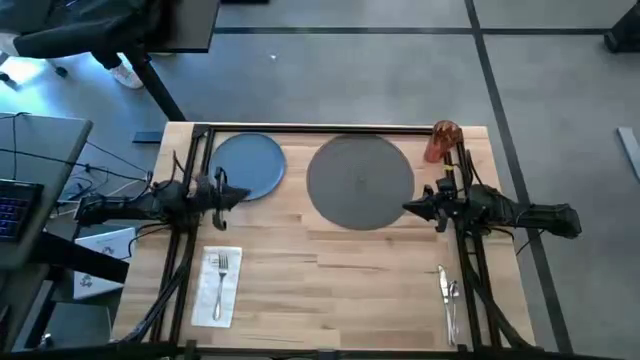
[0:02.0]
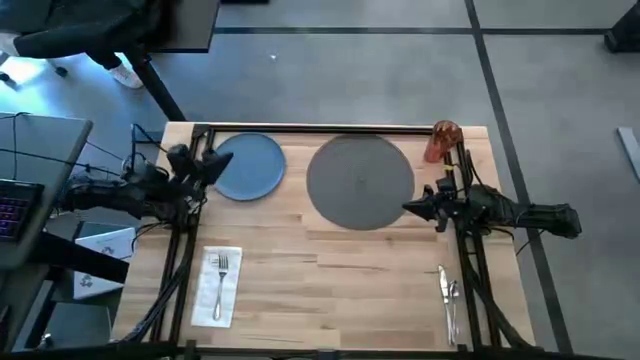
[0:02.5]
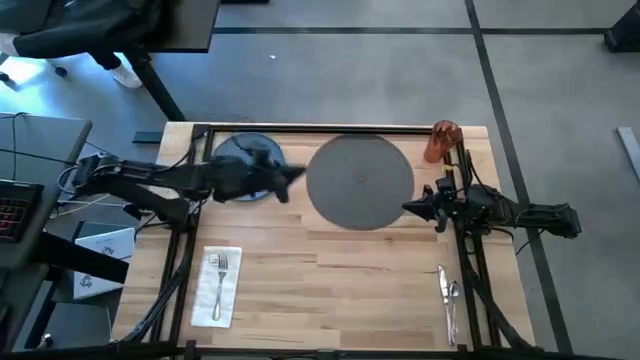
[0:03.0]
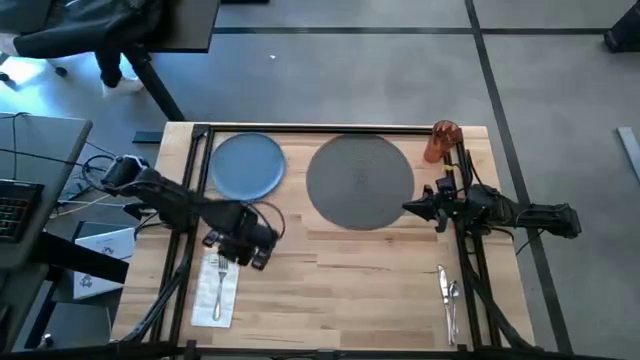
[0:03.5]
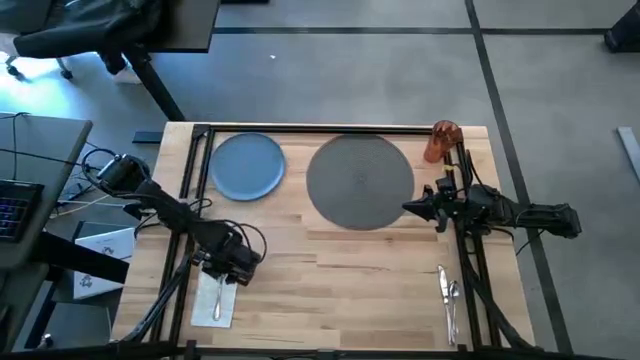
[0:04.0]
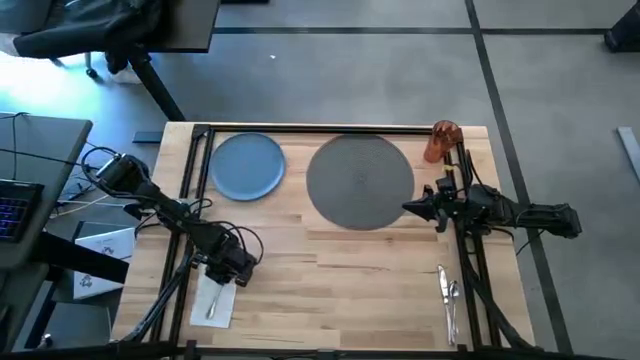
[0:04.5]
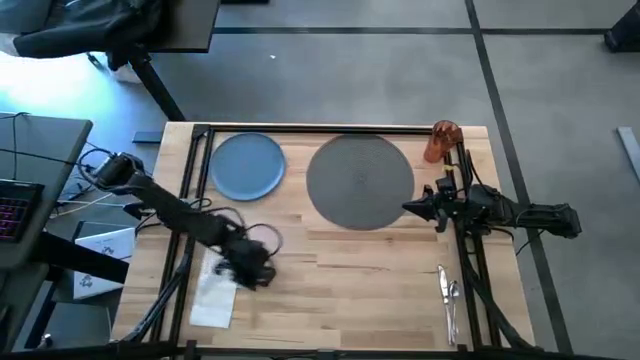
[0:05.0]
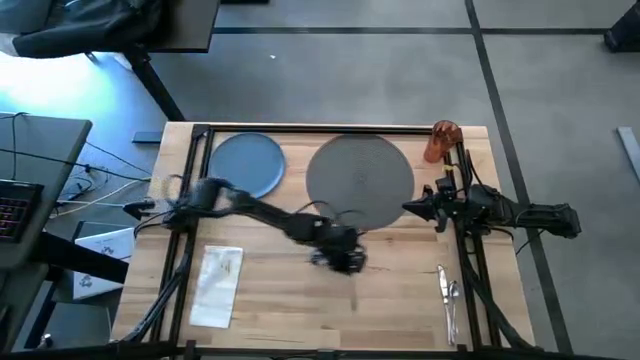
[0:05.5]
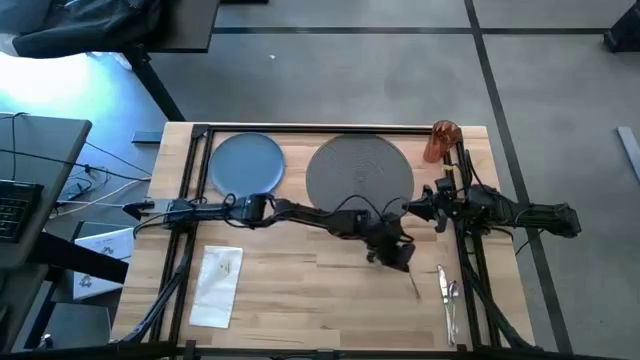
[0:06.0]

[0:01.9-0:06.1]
Task: Set table place
Move the silver fork to the left side of the table knife

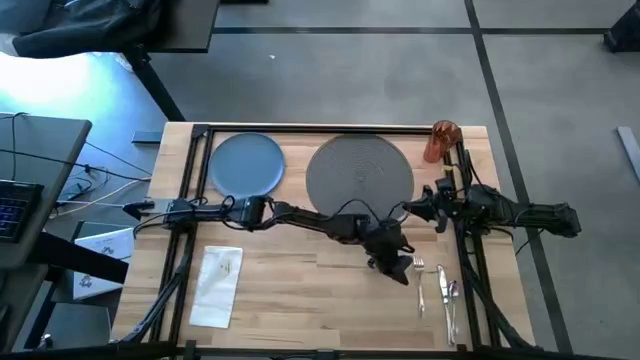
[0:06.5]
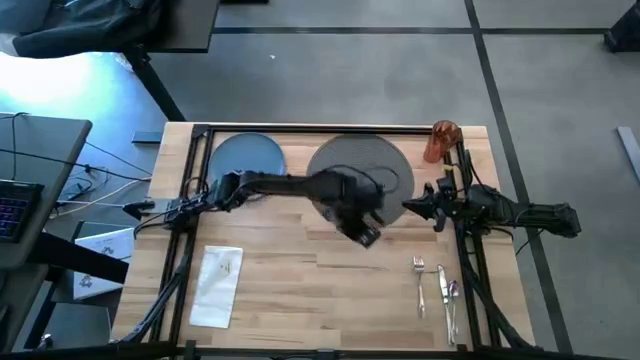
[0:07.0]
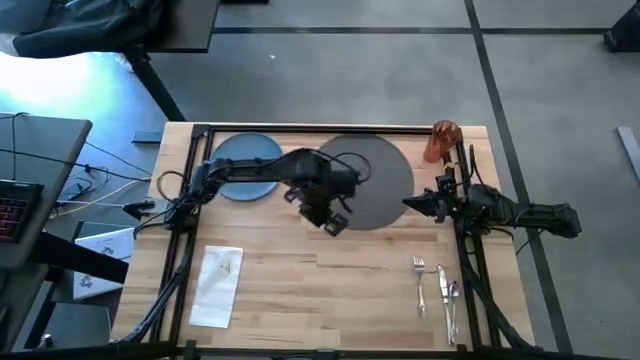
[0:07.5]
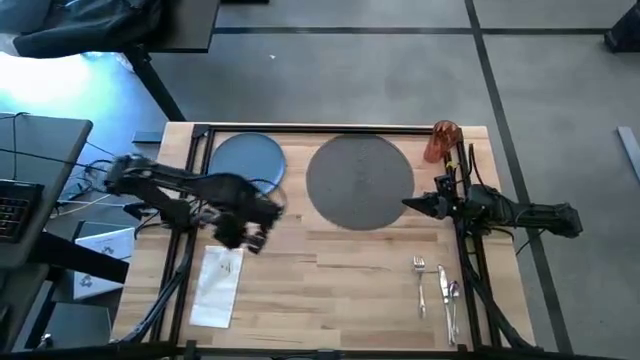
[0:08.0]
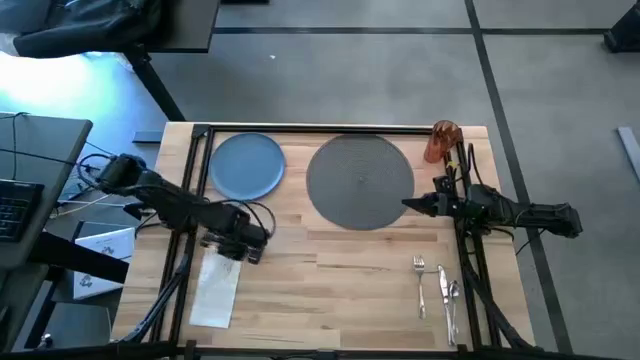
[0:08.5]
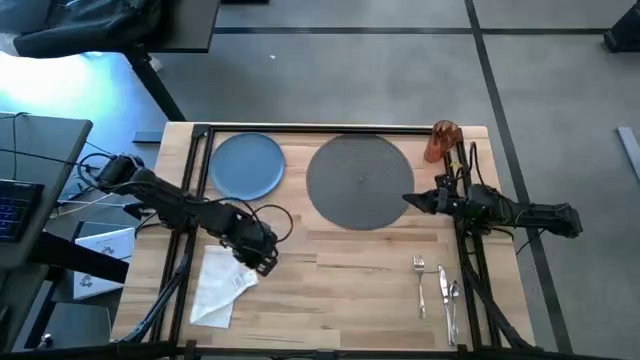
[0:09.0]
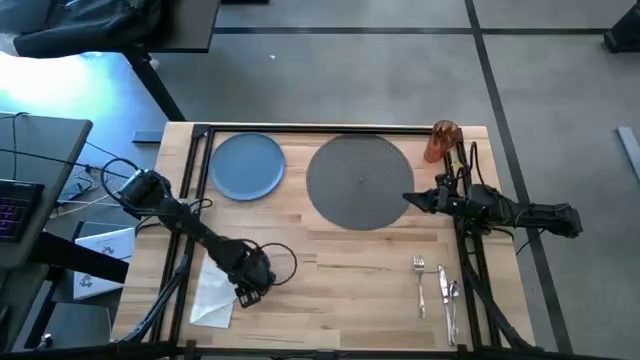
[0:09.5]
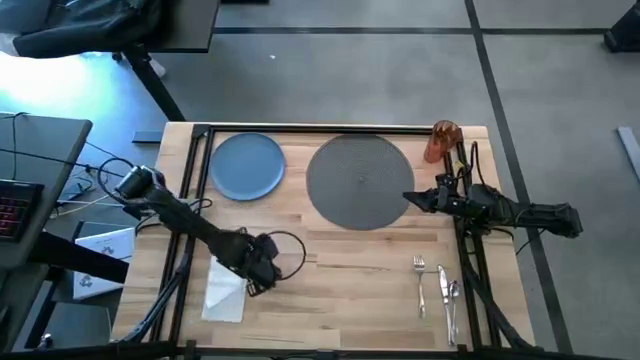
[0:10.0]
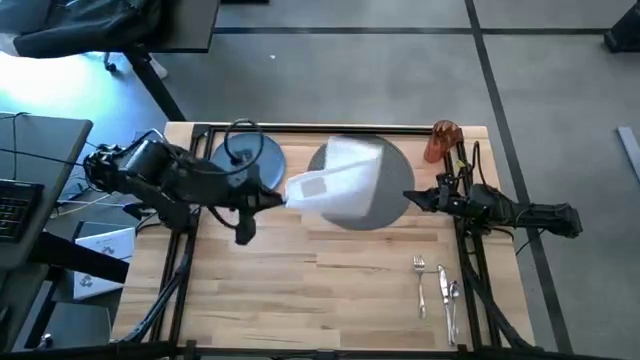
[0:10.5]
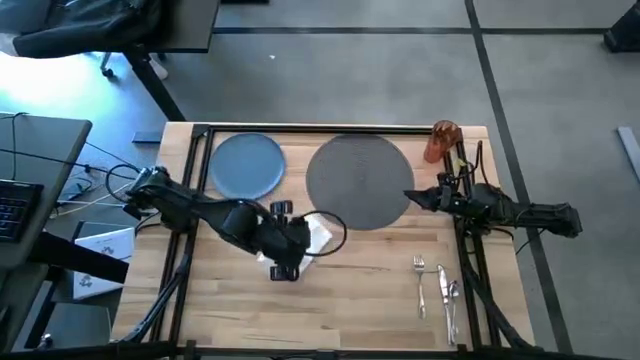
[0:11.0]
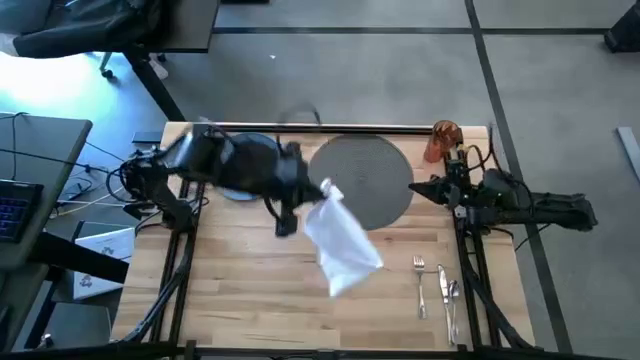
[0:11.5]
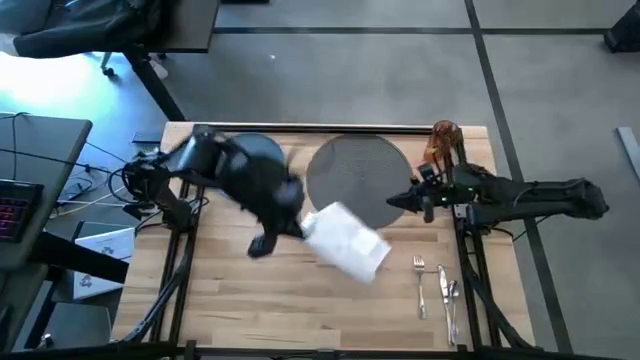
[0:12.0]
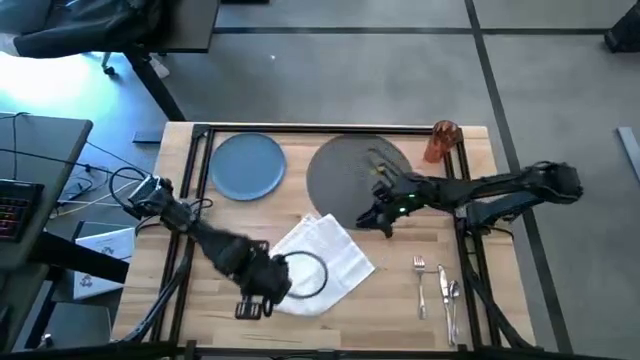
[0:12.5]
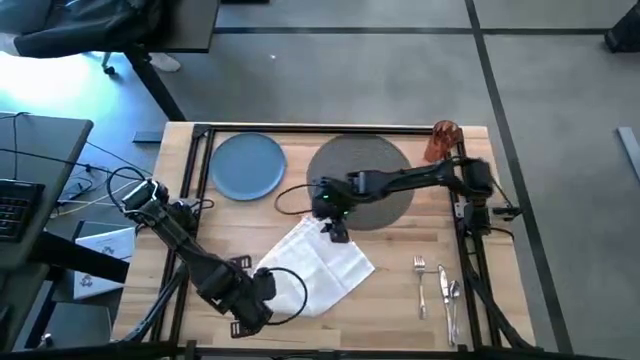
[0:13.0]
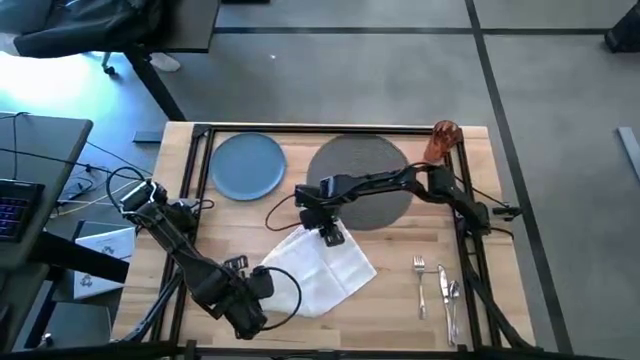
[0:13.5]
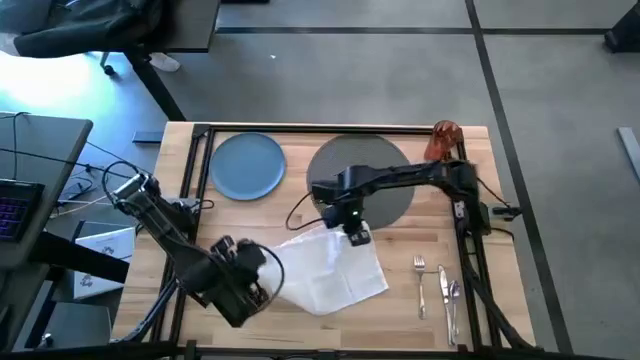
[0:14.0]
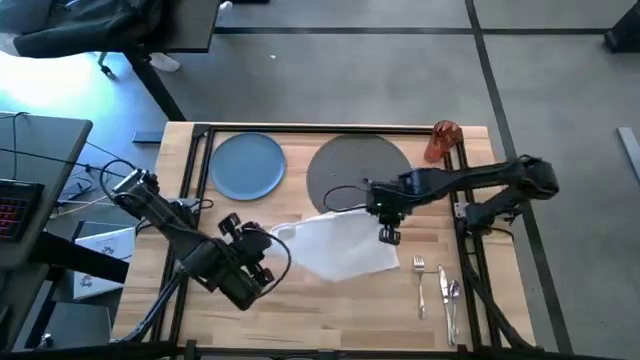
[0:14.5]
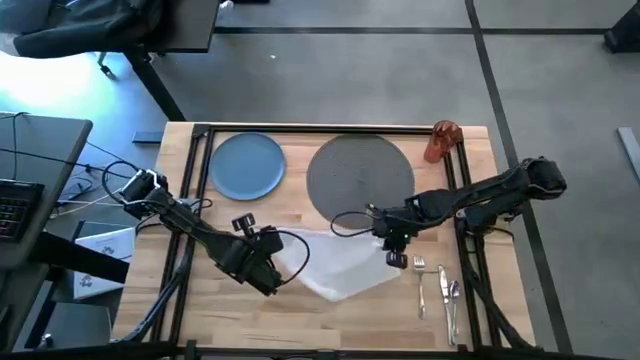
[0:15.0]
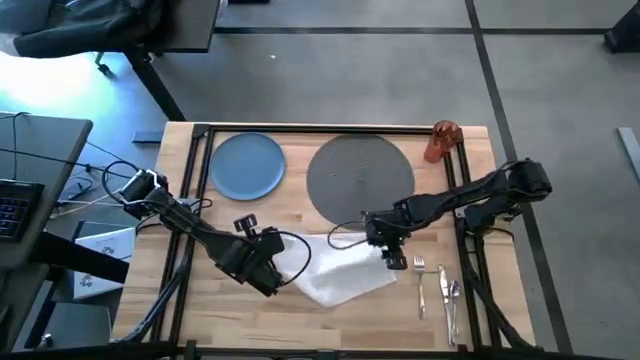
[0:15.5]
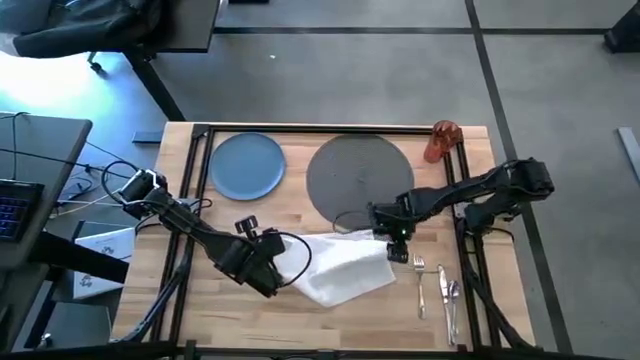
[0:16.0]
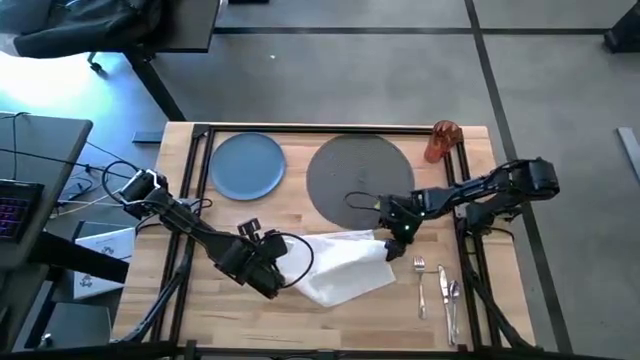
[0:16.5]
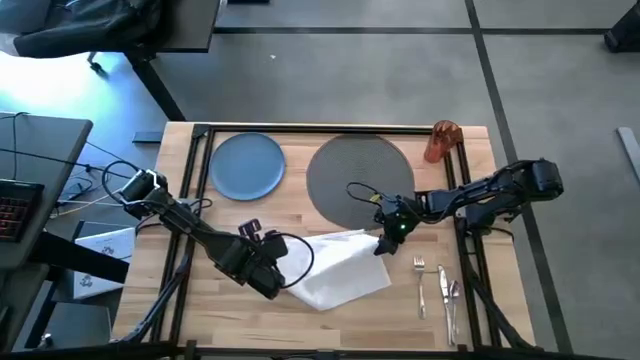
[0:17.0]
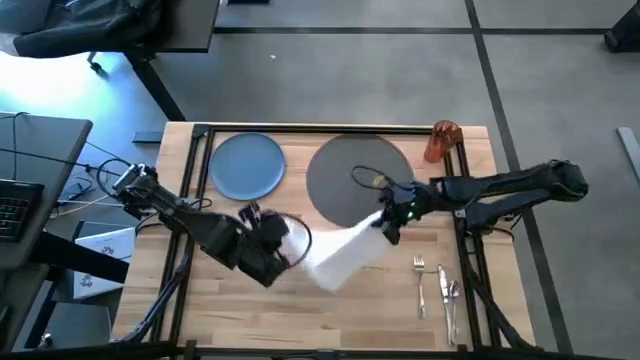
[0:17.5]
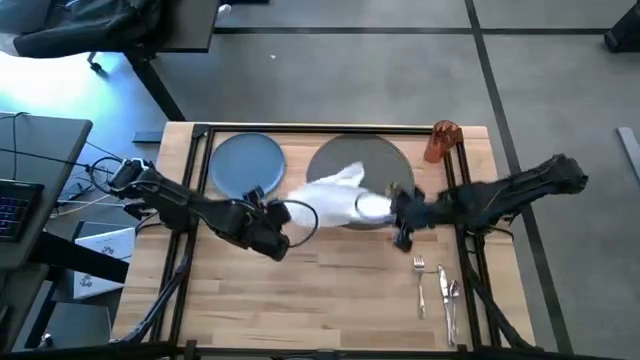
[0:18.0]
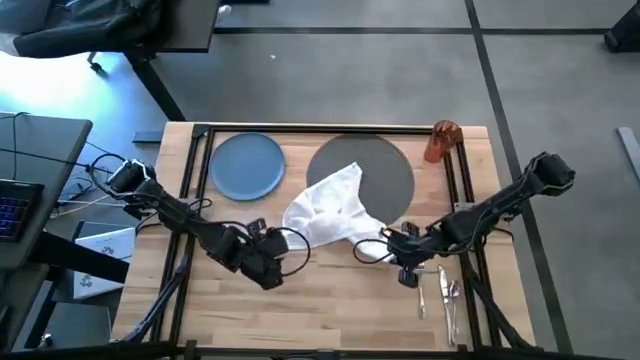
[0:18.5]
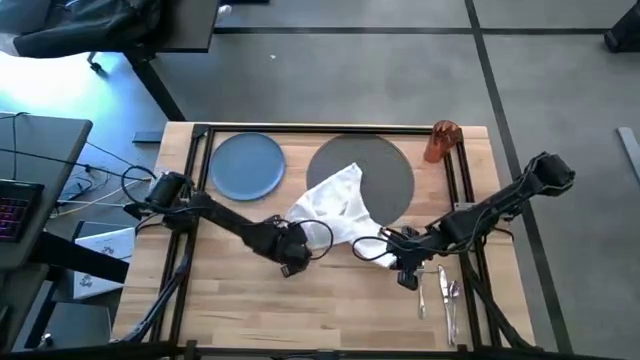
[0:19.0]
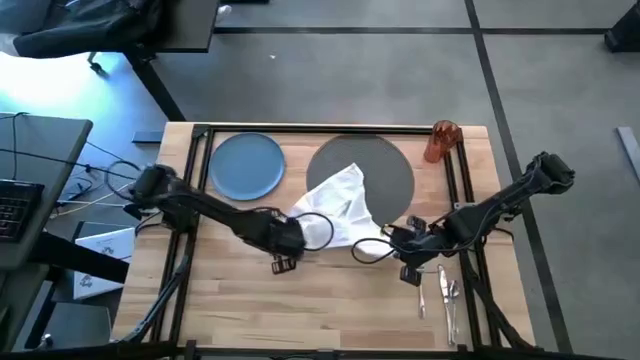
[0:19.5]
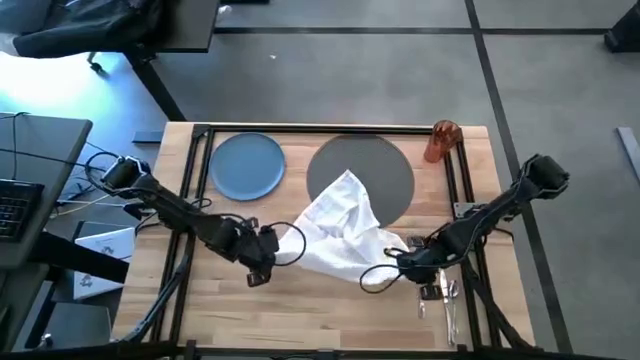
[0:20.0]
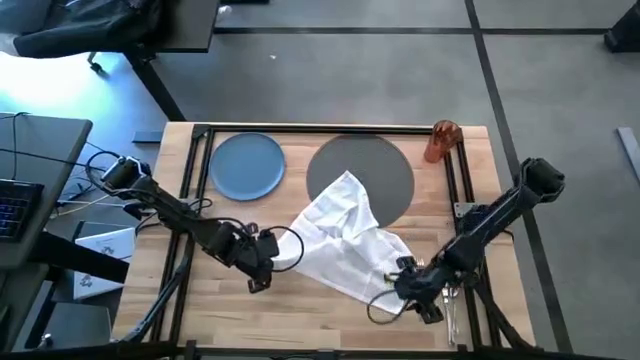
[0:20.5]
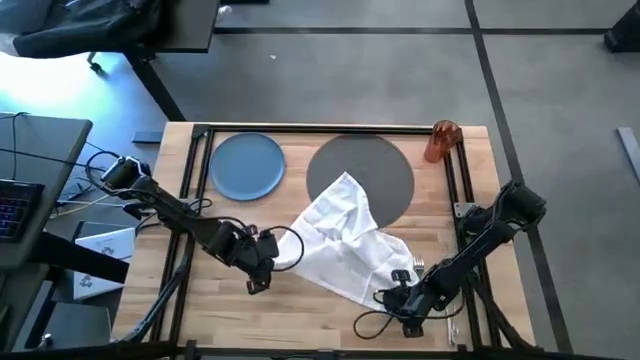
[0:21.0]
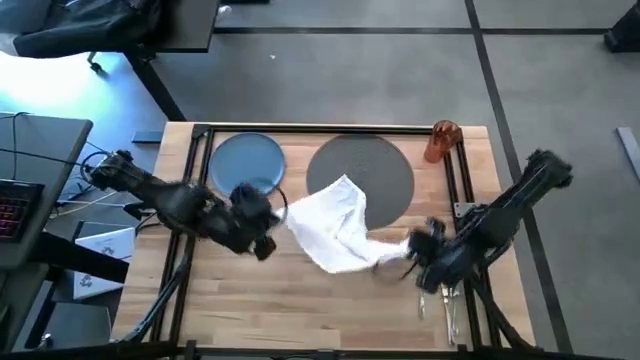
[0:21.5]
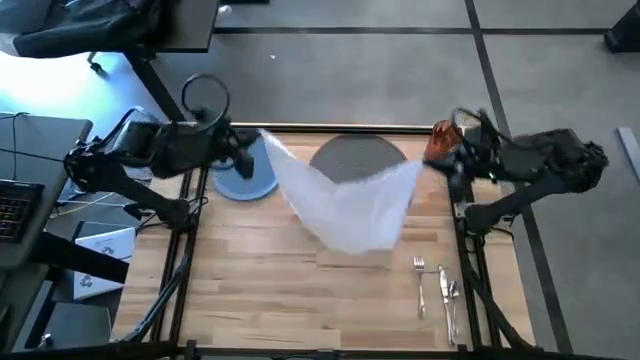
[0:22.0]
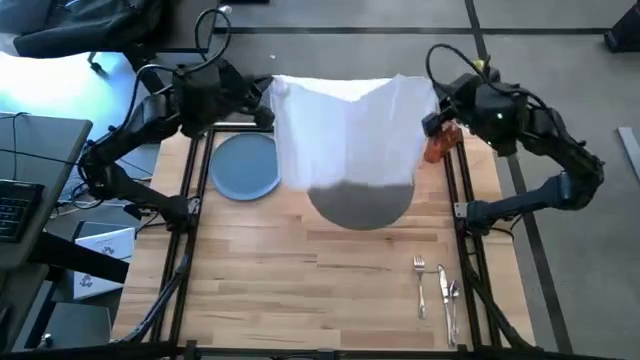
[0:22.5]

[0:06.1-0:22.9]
Fold the white table napkin

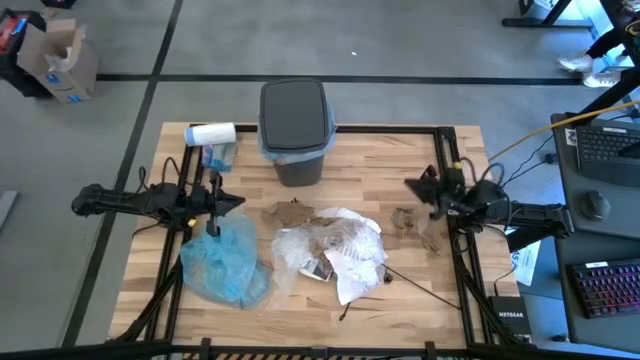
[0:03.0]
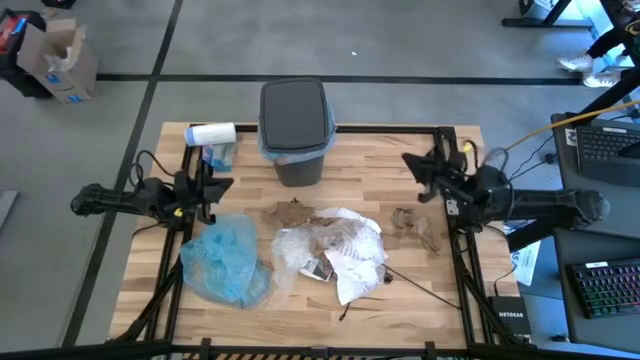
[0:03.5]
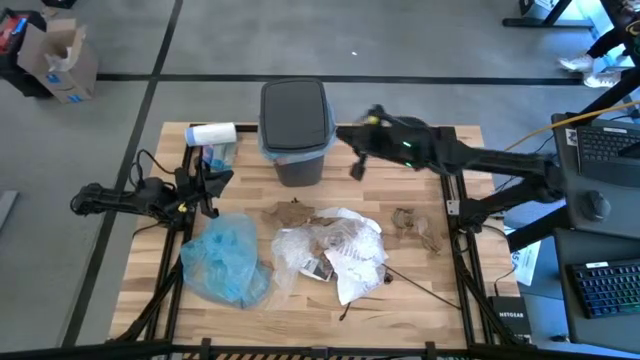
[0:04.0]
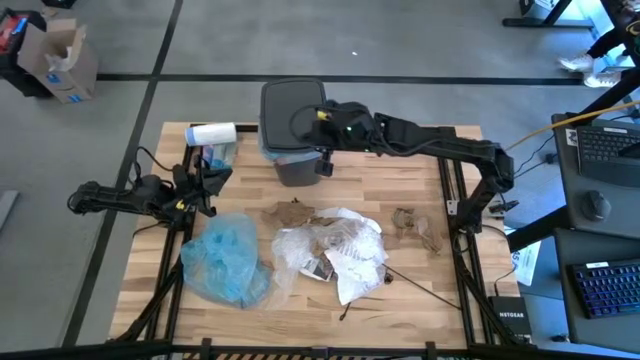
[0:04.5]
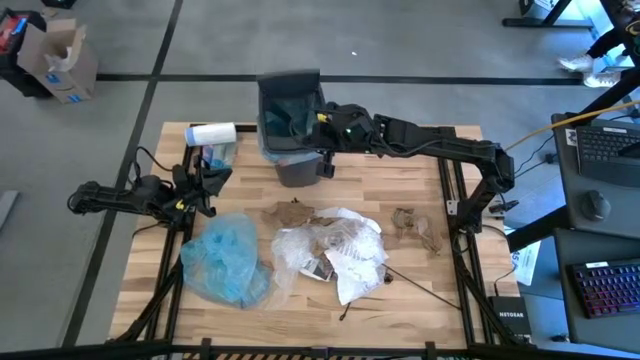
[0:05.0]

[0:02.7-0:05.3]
Task: Pick and place trash into bin
Open the trash bin
